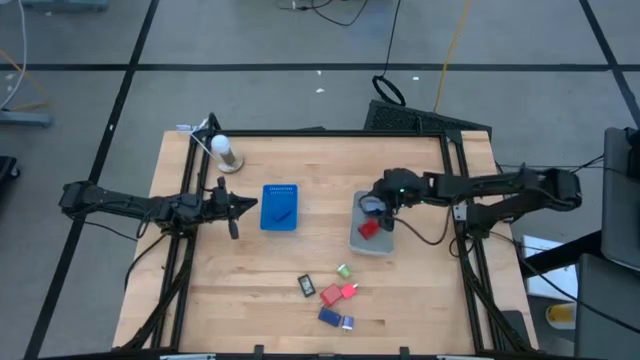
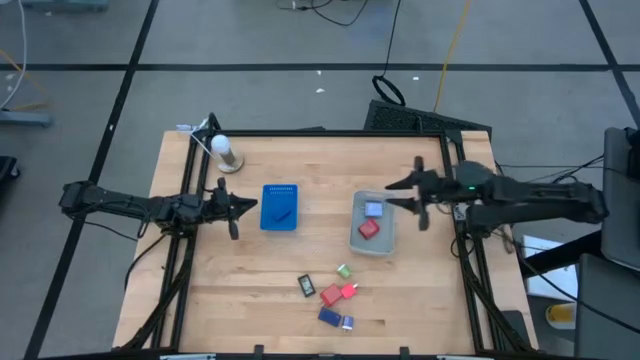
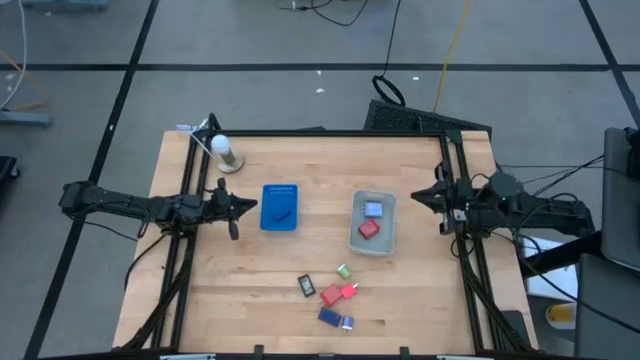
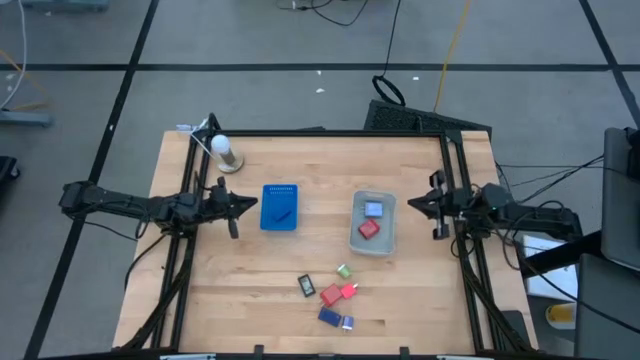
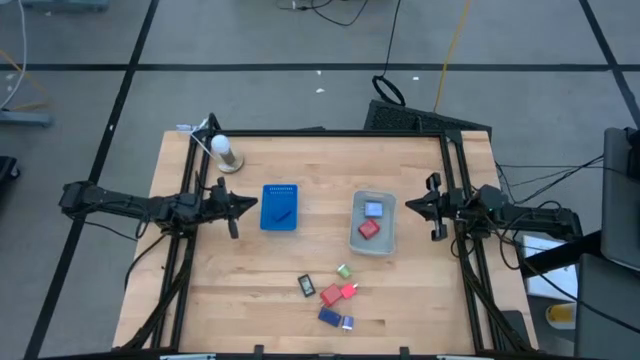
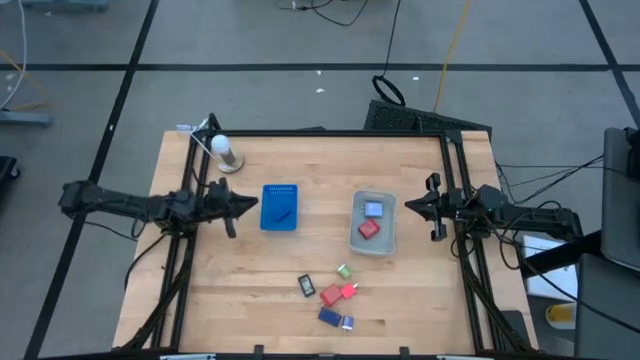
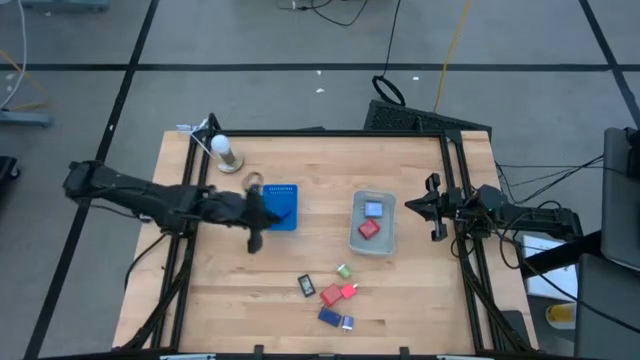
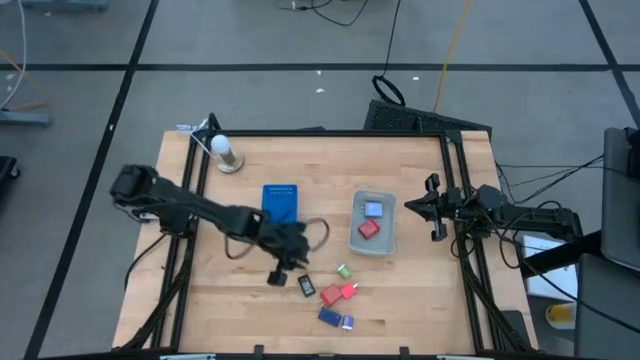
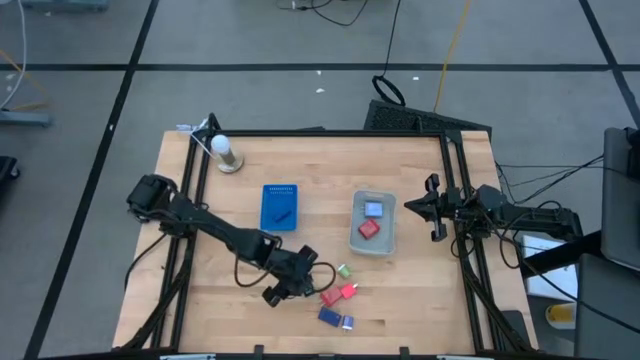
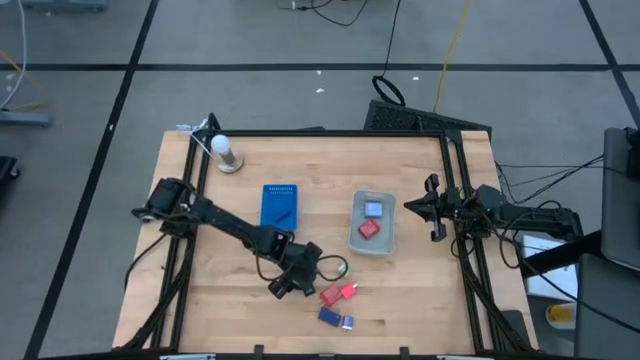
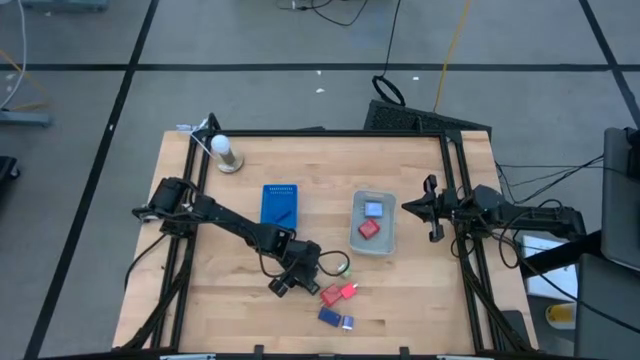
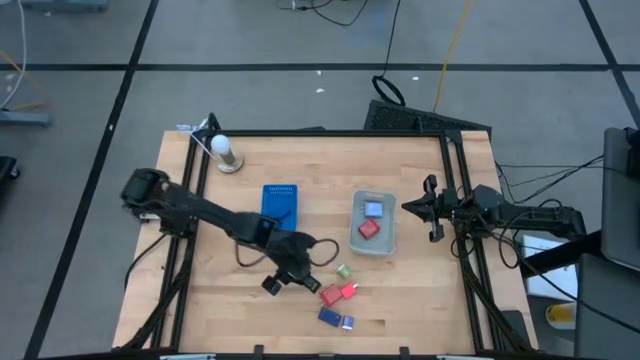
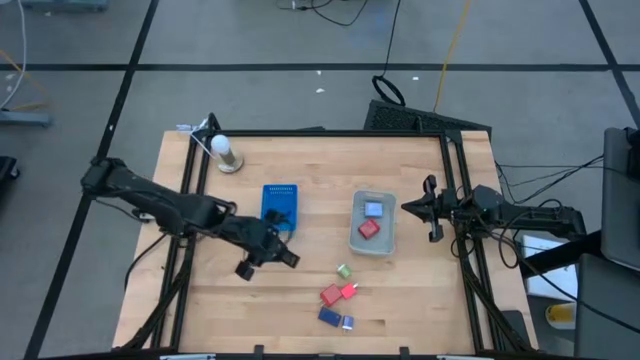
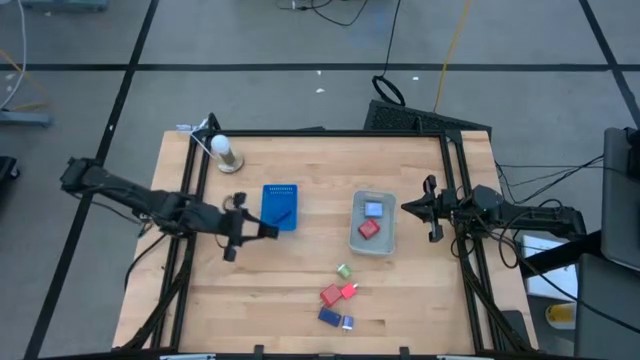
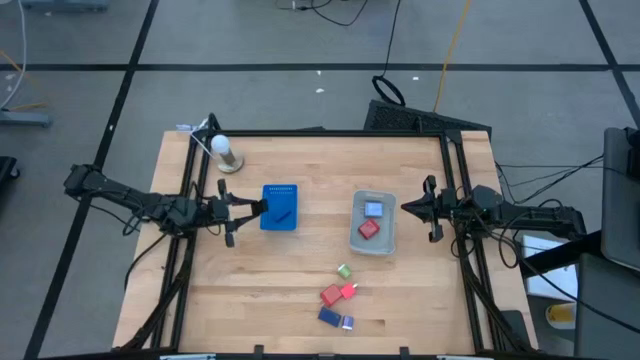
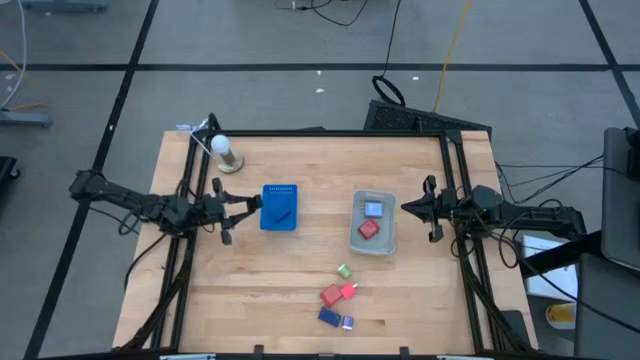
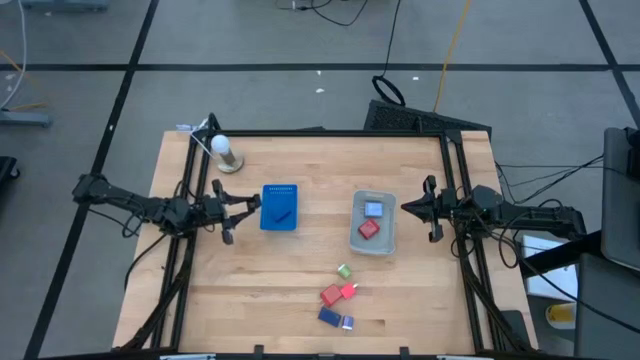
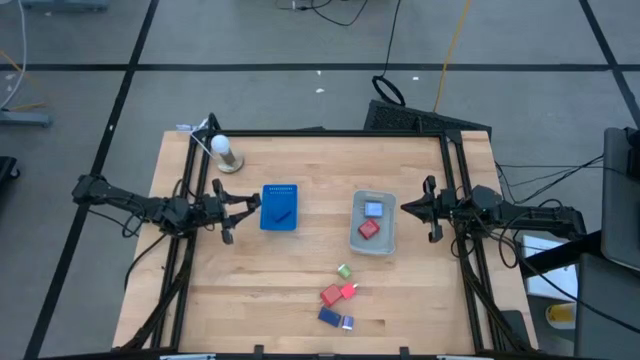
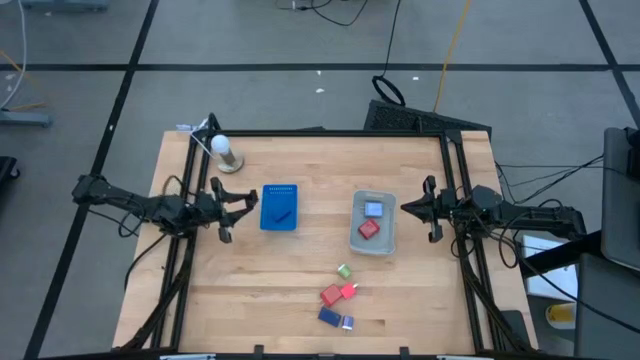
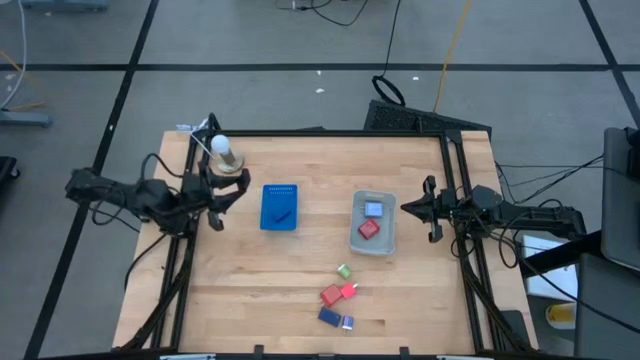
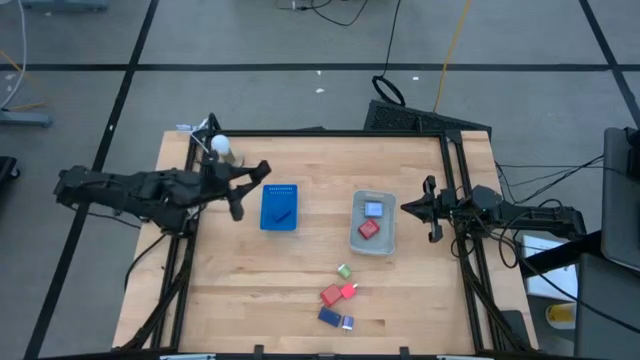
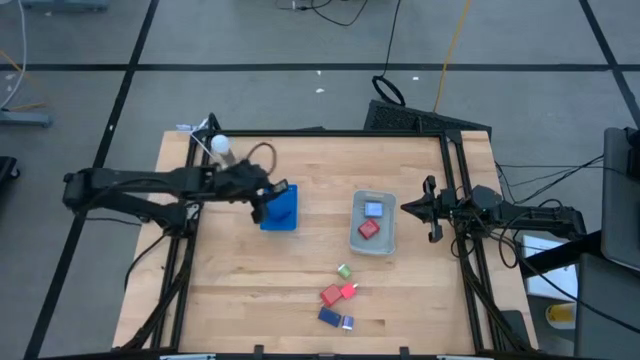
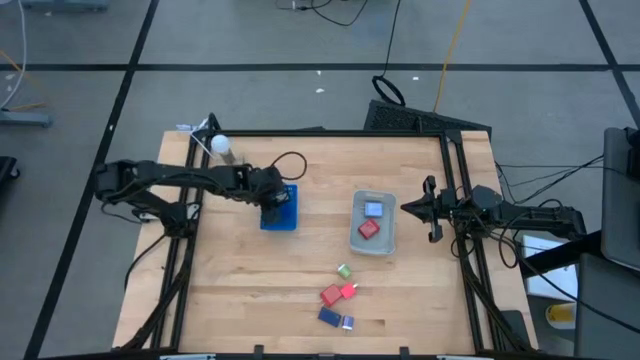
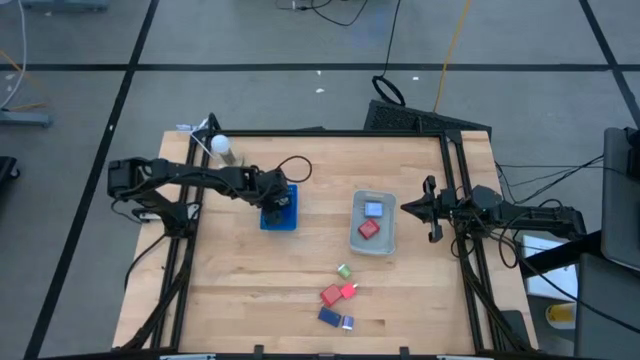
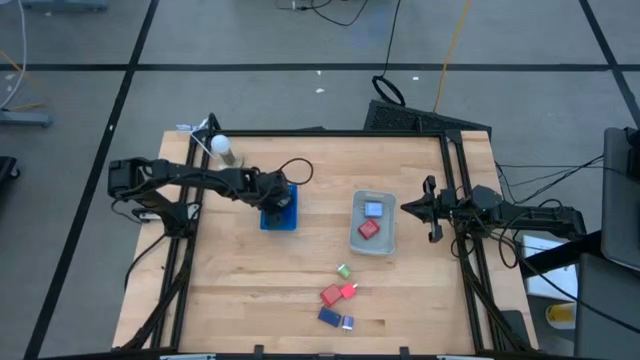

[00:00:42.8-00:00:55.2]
Task: Pick & Place Office items
Put the black digital clock into the blue bin

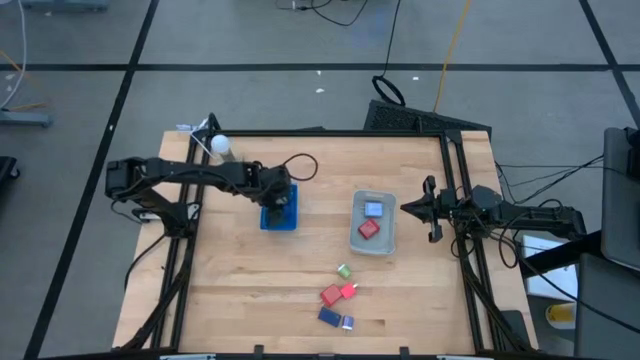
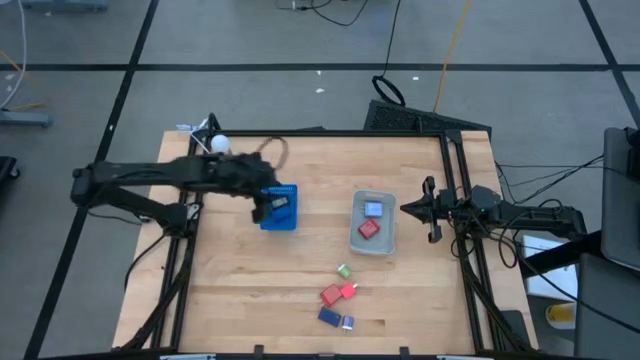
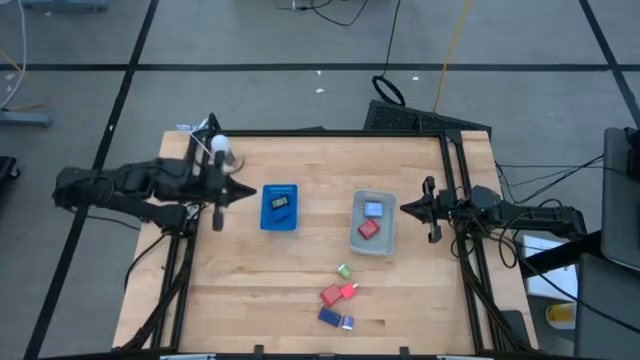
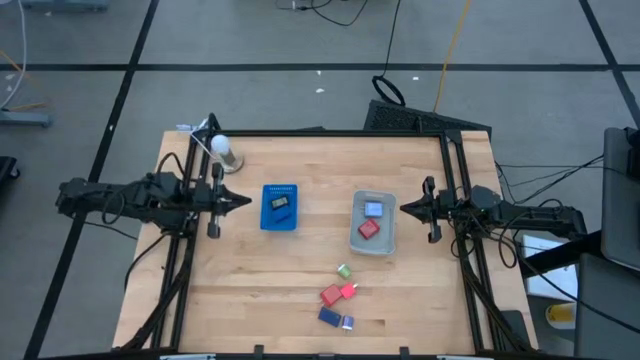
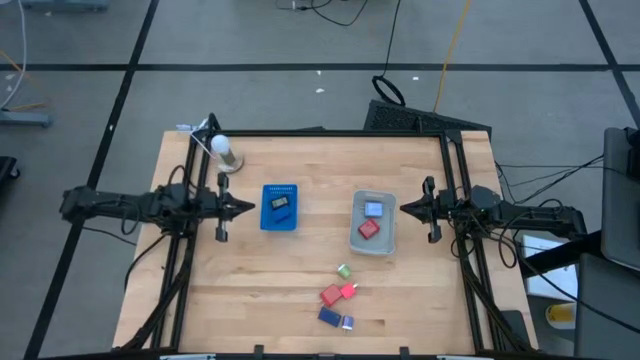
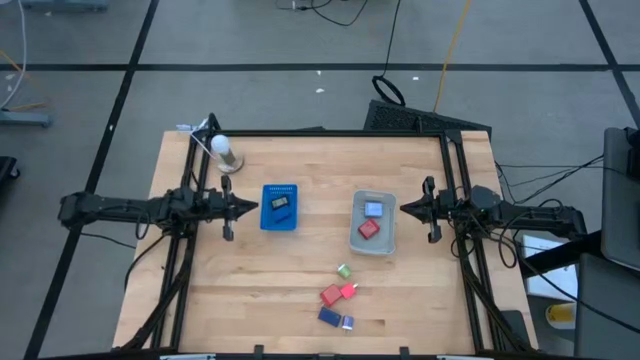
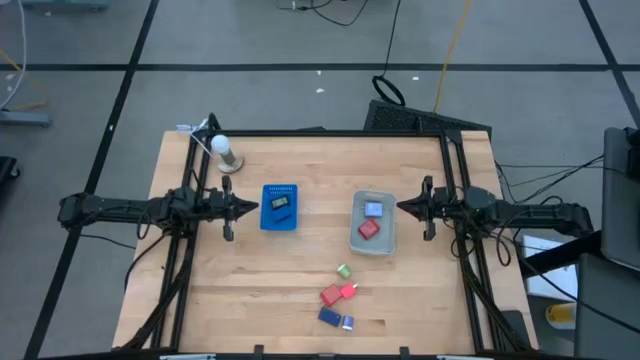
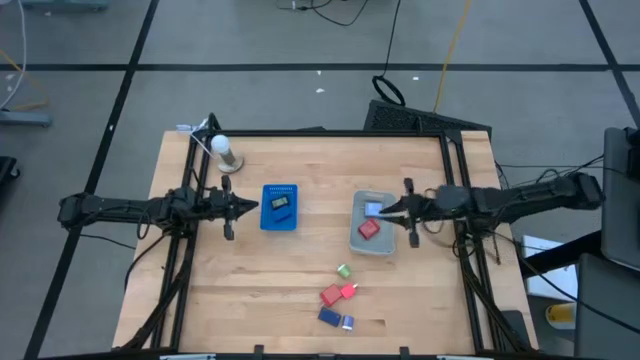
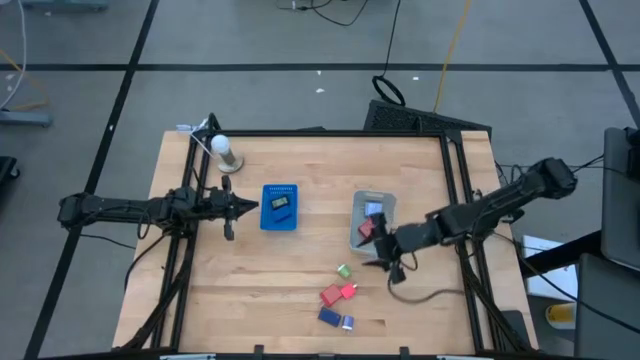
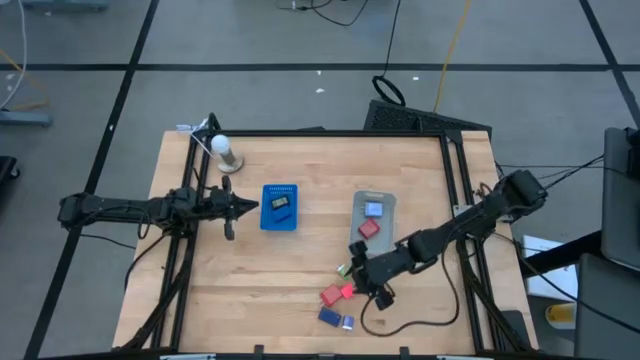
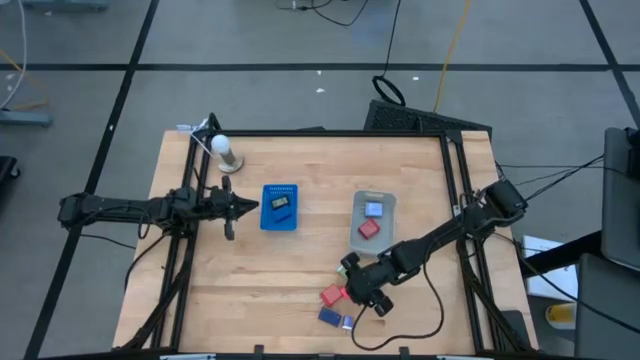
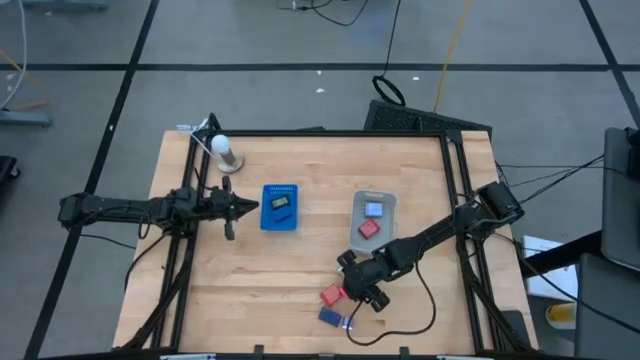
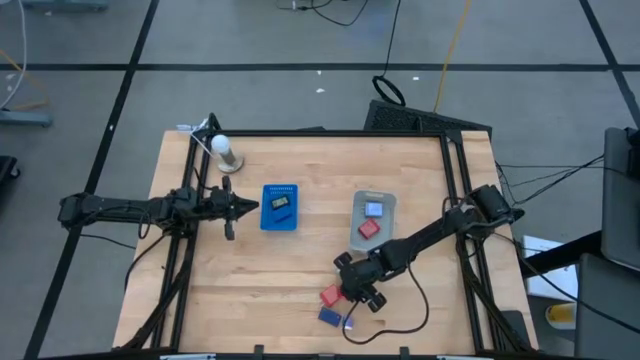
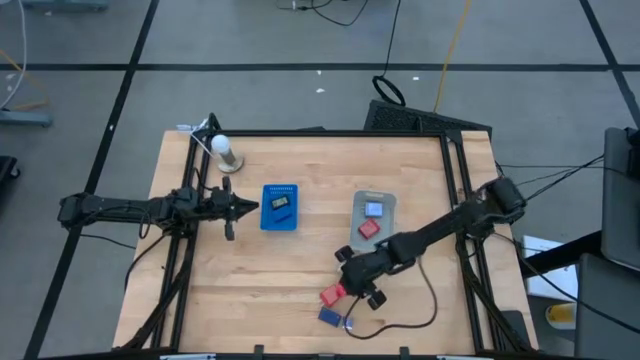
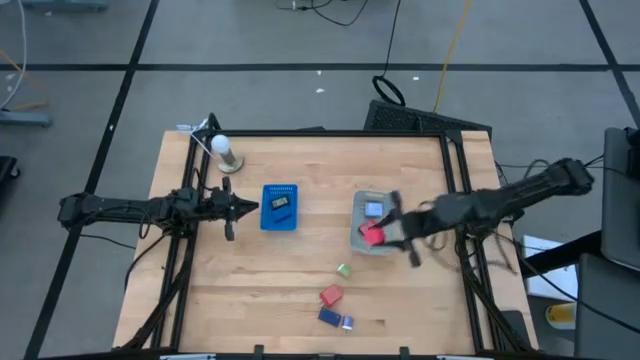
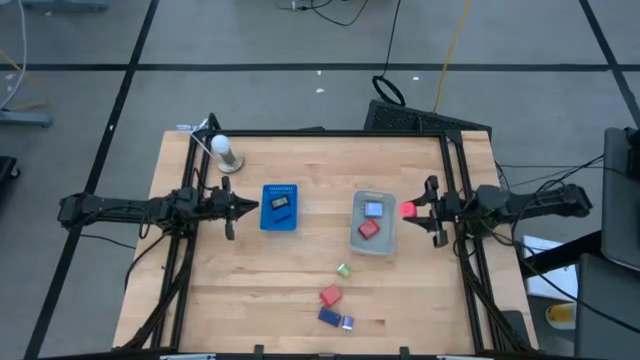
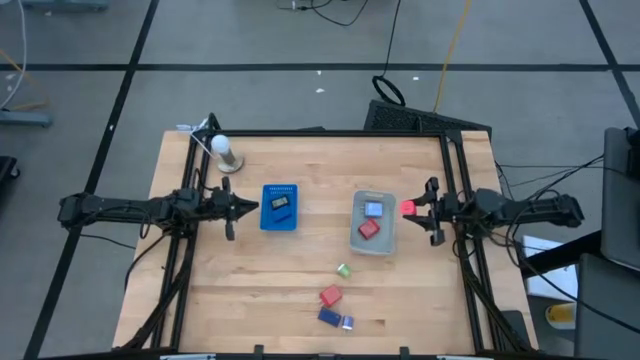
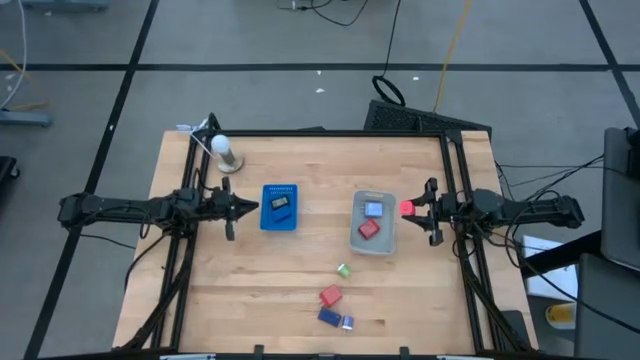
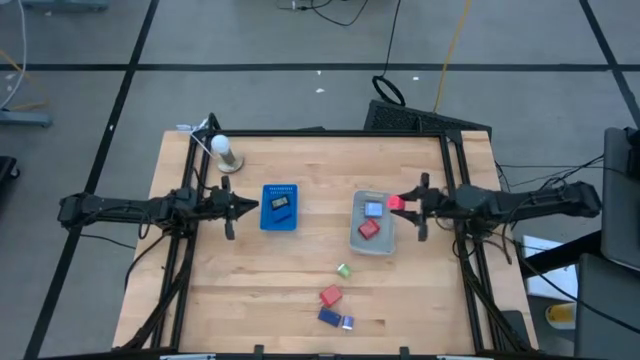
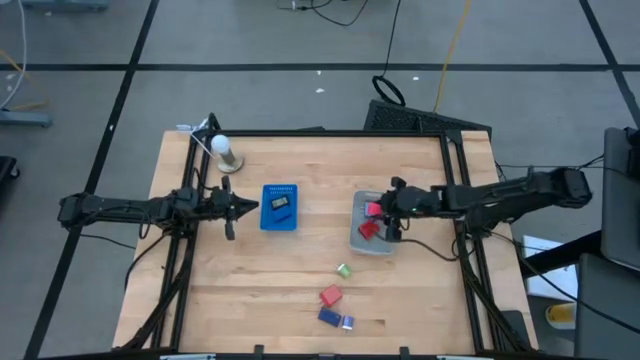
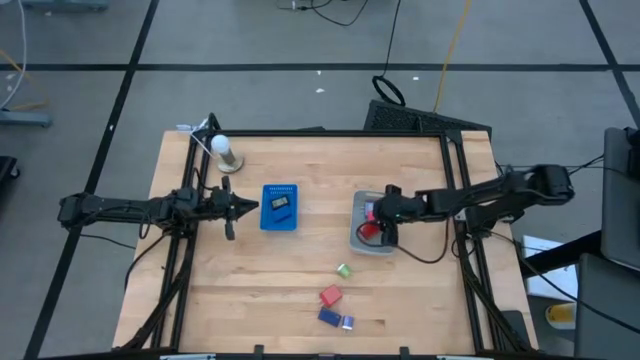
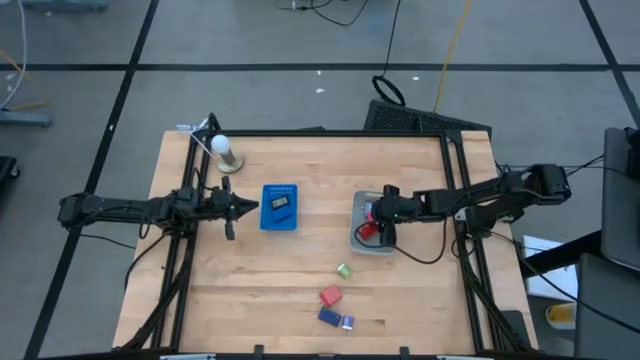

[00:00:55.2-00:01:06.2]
Put the light pink charger adapter into the gray bin
